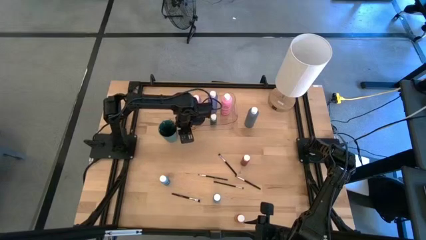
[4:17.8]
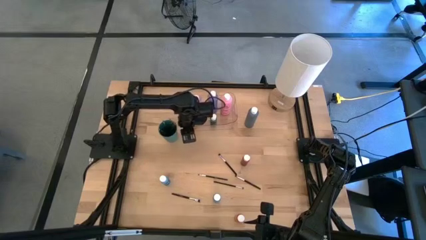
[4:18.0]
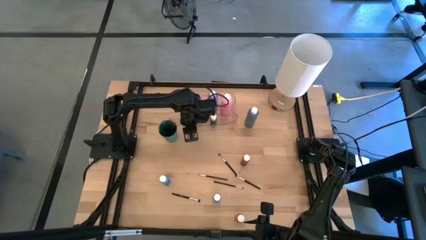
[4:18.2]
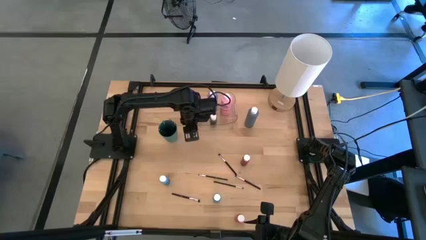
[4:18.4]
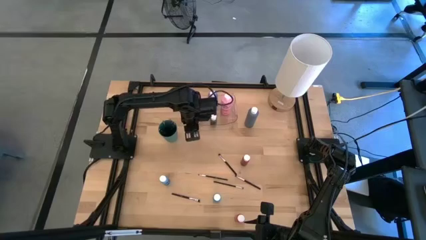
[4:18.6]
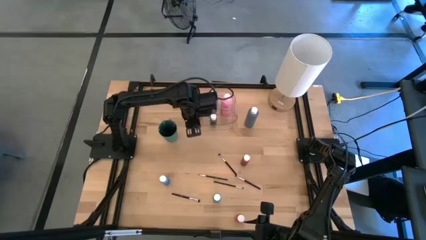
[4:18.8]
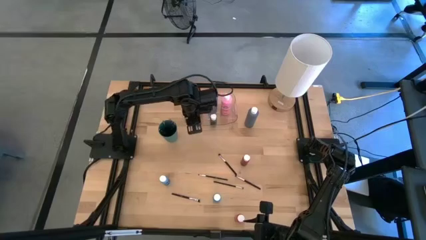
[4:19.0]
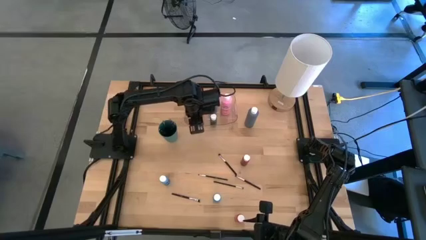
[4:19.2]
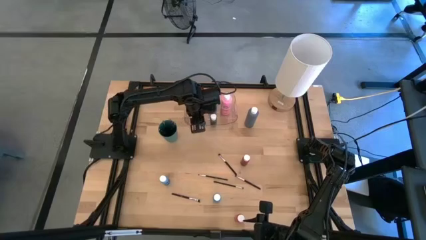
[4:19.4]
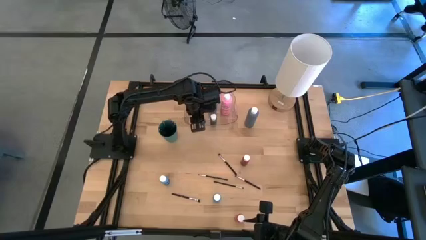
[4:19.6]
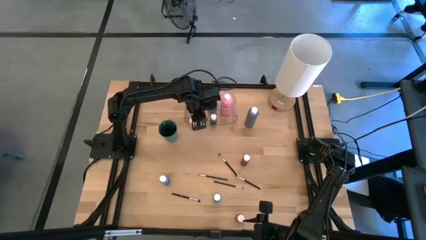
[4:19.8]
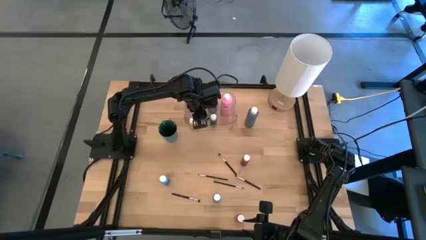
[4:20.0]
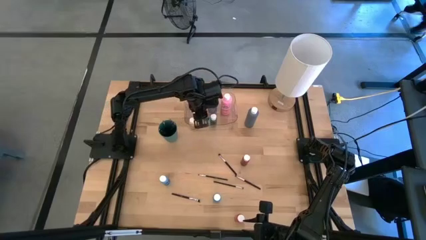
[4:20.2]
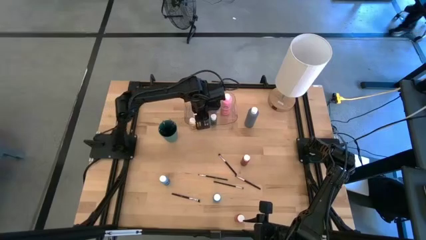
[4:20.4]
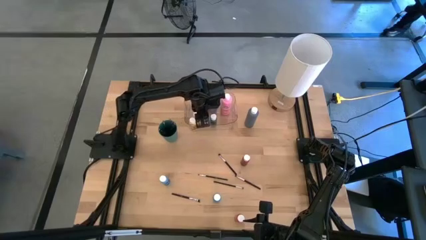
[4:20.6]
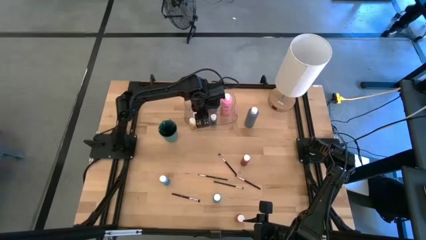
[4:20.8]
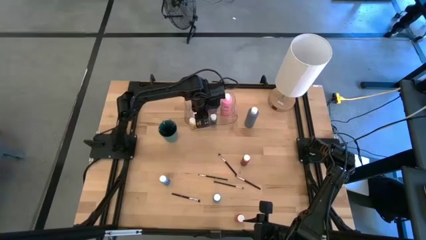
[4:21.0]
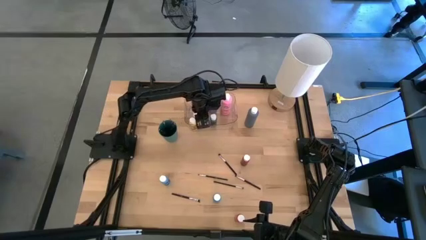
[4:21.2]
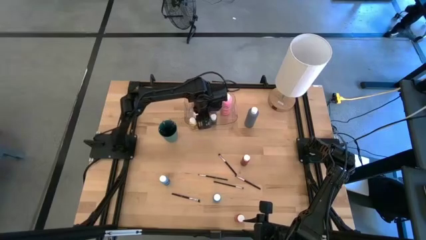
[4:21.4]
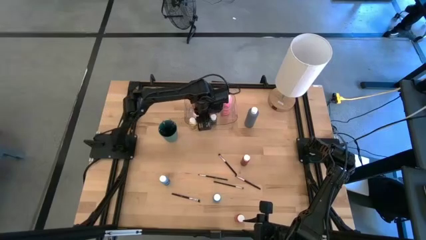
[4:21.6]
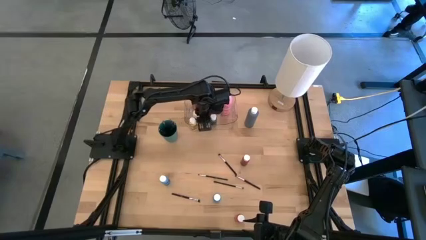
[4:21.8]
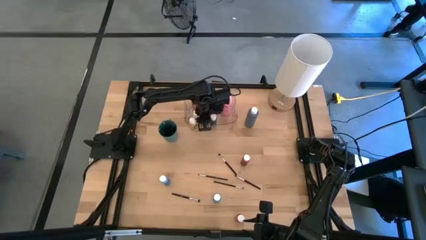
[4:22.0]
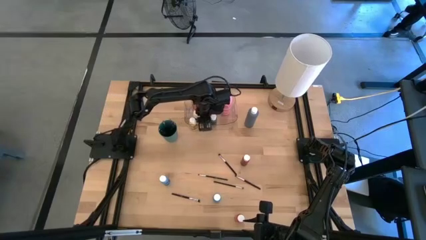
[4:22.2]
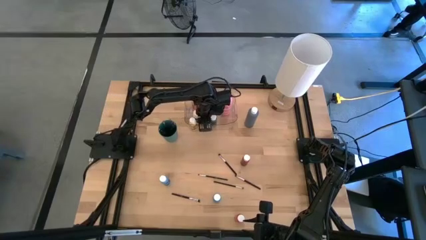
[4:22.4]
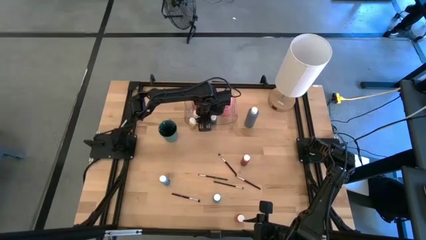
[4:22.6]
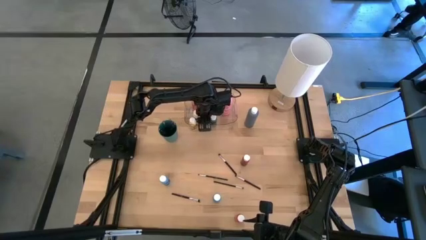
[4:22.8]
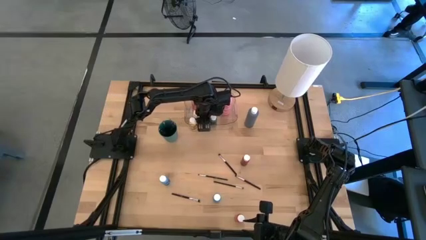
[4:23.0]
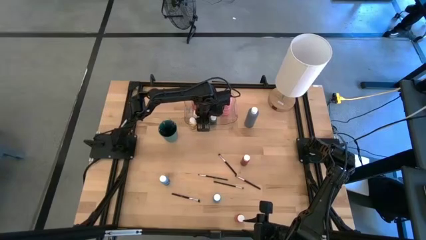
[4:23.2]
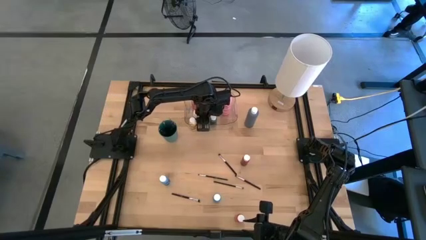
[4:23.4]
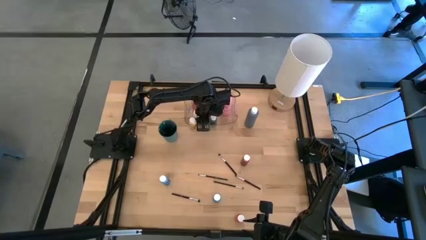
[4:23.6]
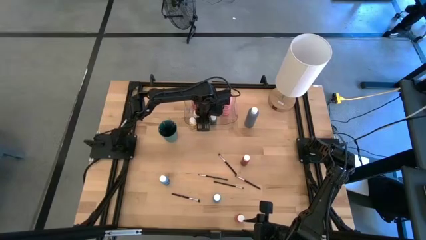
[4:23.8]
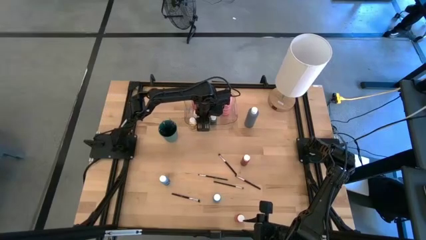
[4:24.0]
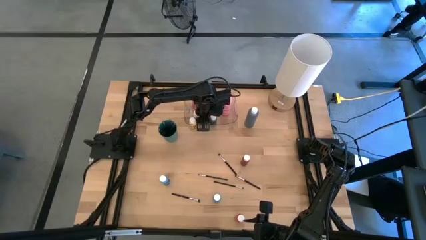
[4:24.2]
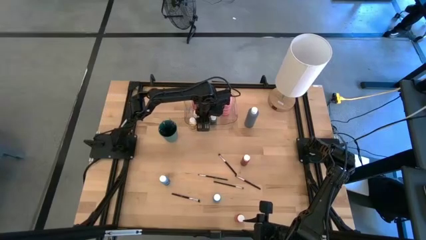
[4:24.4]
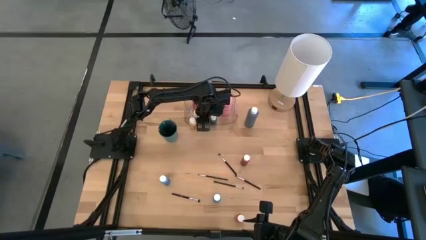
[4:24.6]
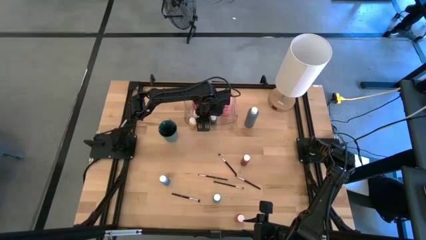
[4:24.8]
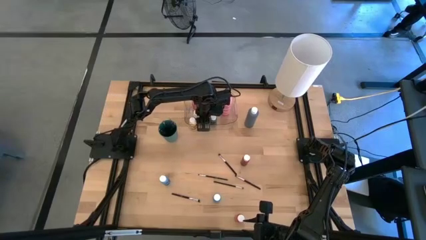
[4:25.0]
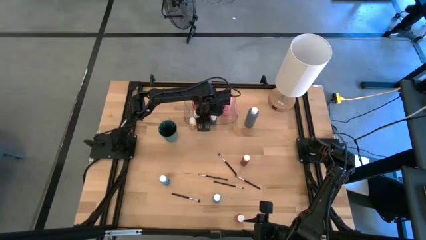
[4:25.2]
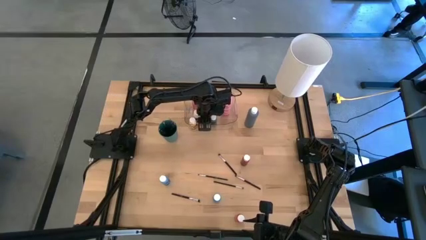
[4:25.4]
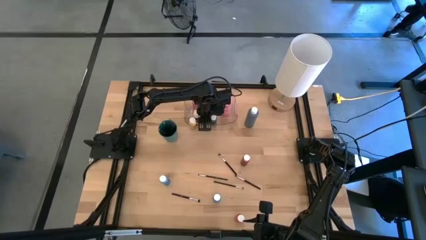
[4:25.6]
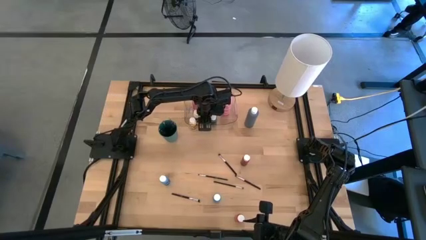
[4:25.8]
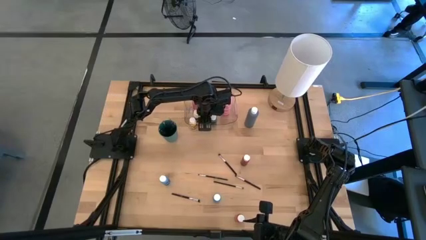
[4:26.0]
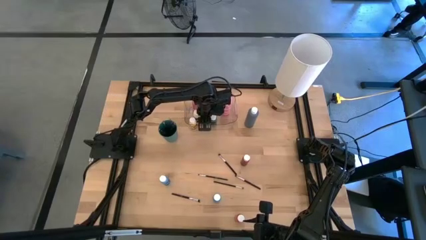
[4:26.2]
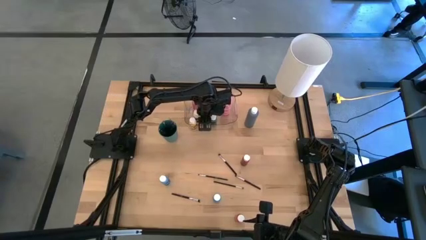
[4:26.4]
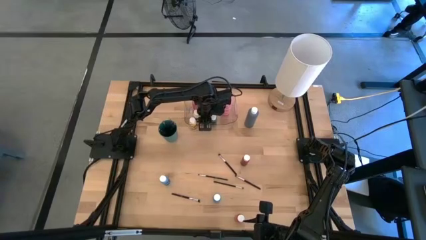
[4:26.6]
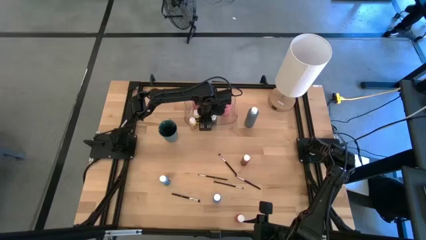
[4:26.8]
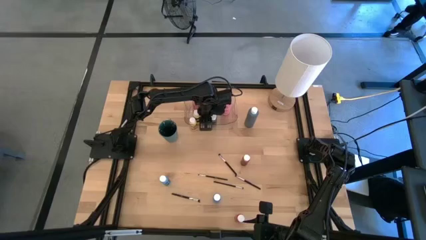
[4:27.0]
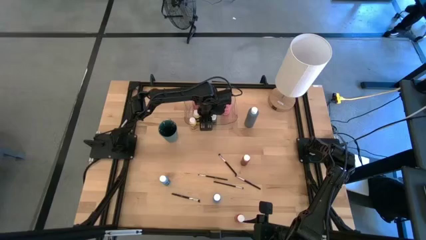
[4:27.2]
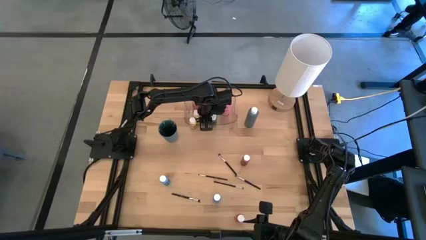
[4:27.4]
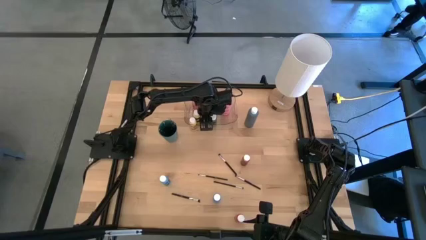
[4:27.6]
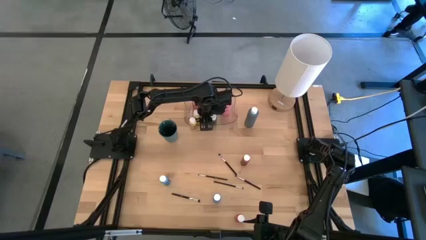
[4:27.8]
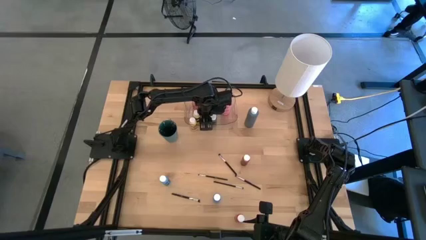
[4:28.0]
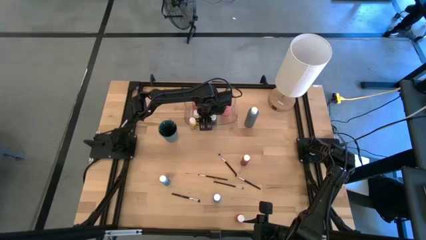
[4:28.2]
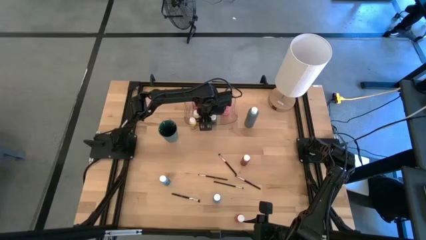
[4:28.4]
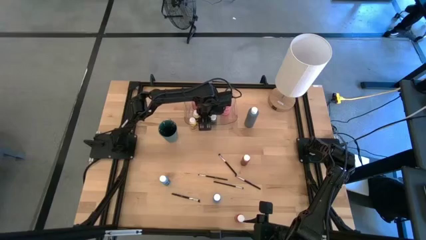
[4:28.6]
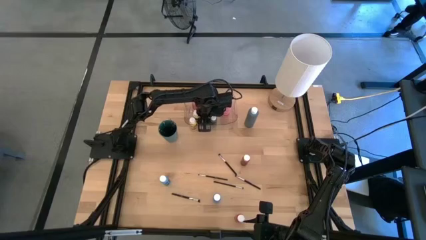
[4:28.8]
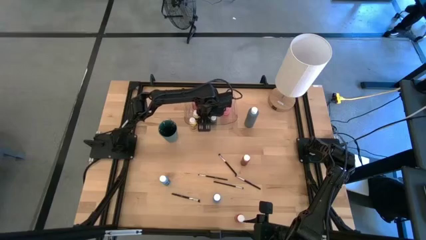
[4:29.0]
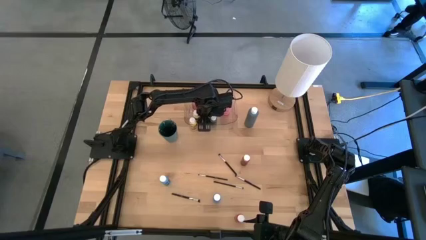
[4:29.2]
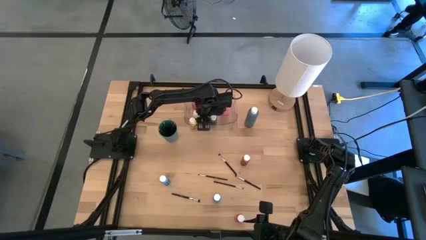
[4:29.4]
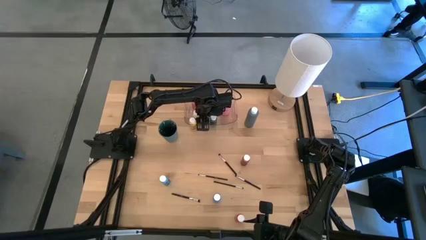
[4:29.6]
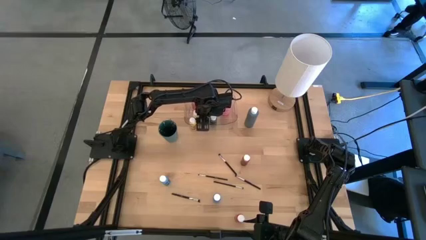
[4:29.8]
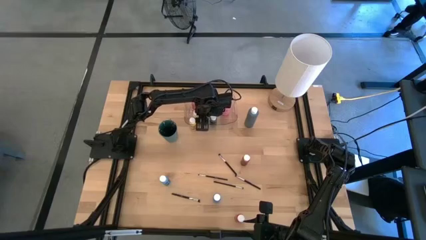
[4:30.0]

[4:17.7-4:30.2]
Task: Pick & Place Paint Supplies
Put the light blue paint bottle into the transparent bin

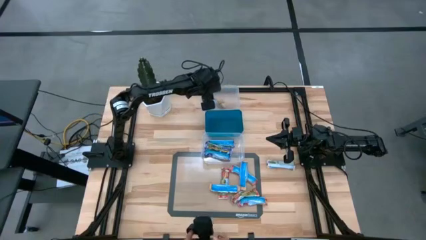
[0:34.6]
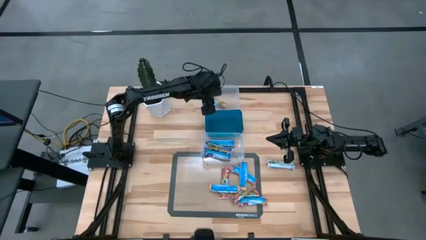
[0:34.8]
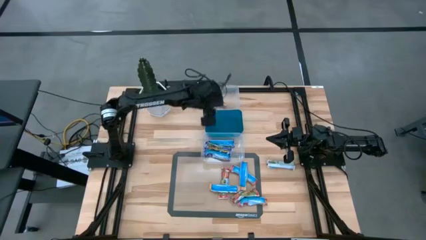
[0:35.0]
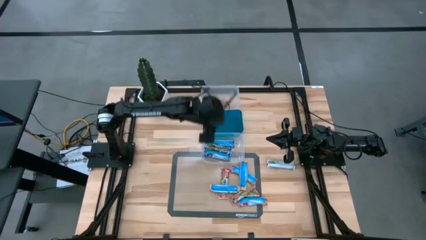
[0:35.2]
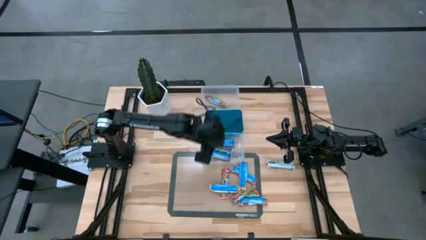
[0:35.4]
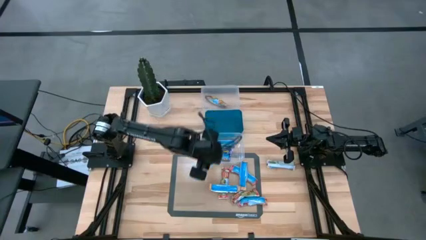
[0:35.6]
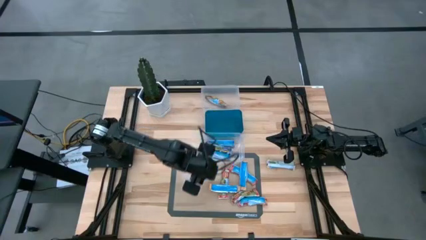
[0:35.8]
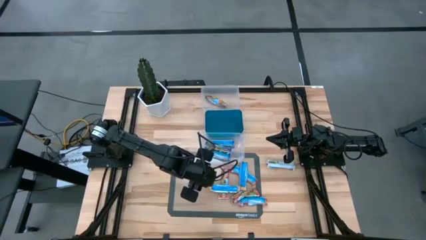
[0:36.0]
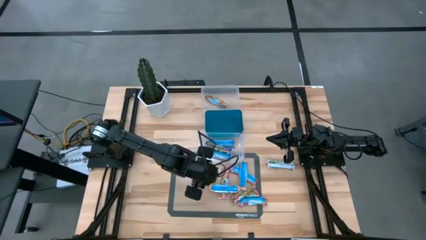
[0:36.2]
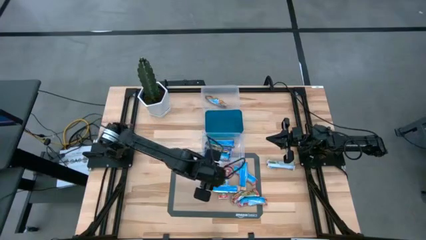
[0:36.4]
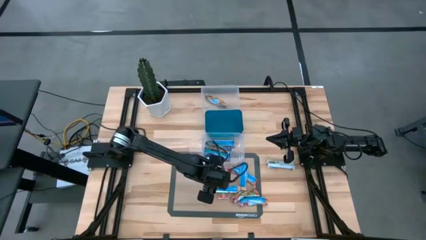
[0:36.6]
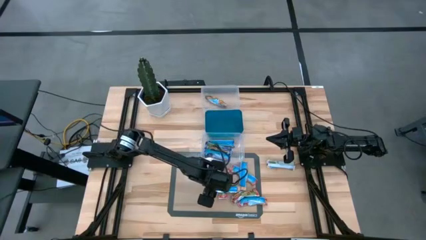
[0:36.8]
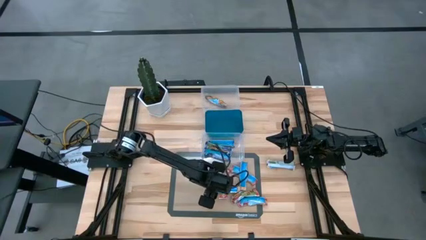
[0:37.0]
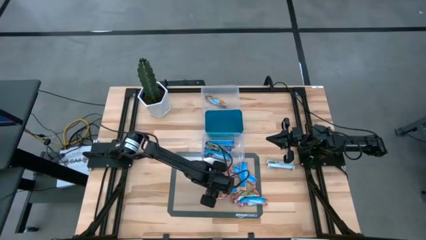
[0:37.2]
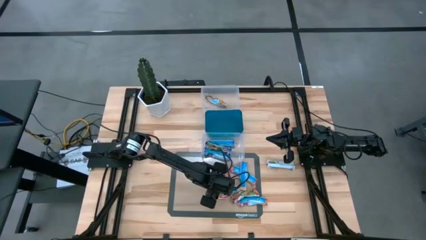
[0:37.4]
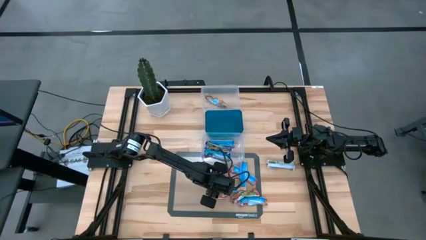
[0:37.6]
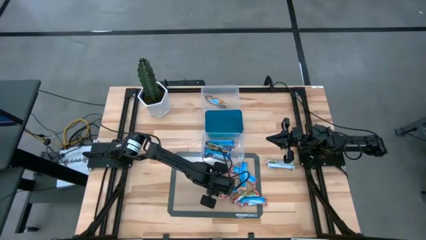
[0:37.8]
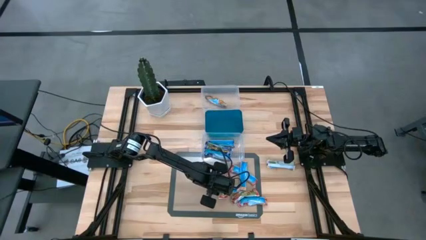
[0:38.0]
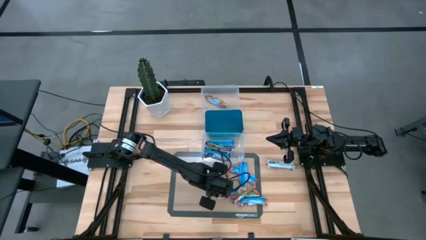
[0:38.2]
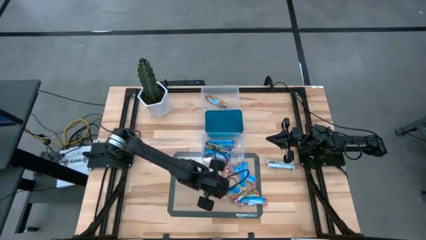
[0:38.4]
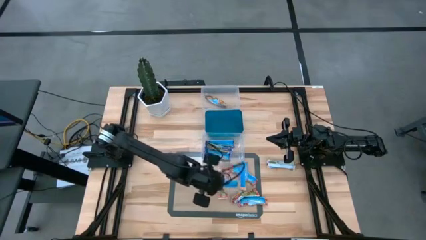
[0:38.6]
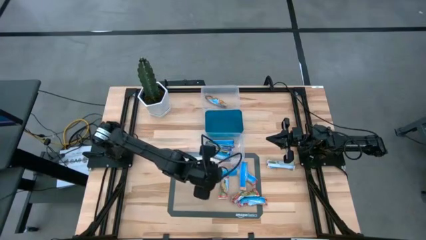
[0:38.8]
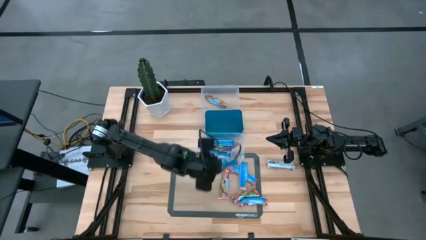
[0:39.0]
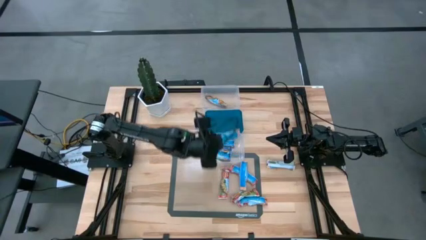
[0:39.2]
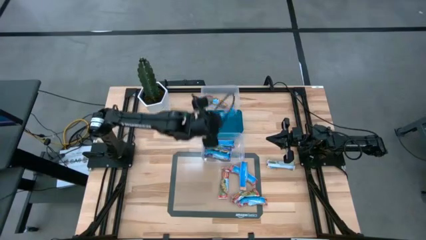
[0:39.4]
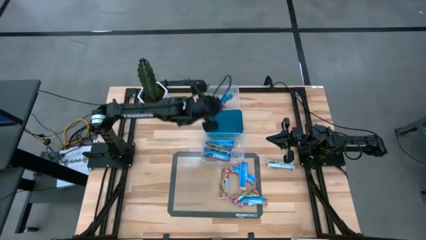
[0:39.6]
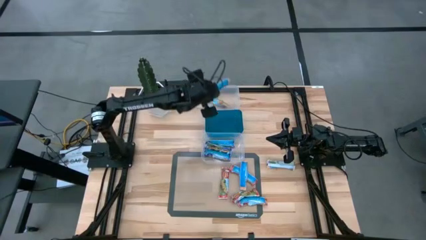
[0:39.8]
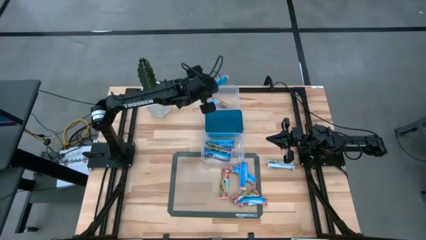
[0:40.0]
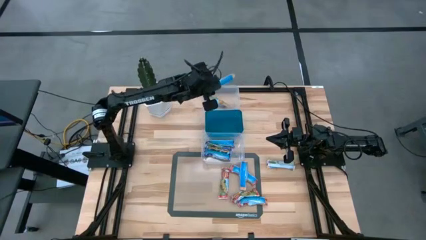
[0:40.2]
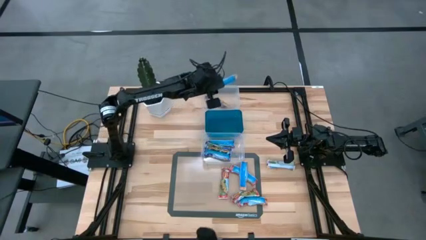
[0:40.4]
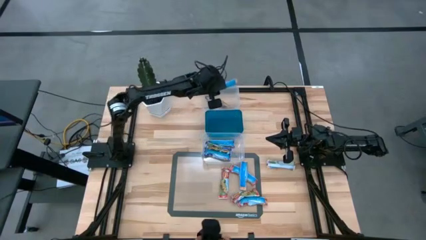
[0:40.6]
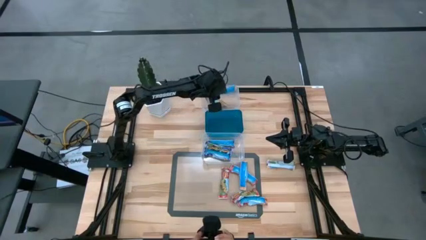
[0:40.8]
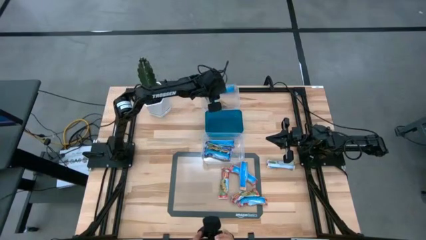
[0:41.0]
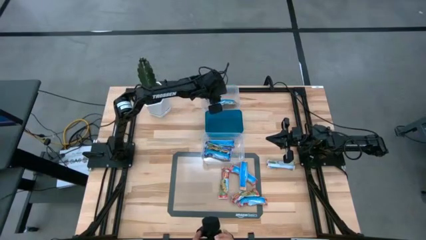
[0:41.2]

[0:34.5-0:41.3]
Task: Pick and place Granola Bars by type
Put the yellow granola bar into the top transparent bin
